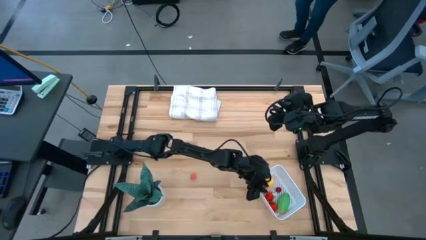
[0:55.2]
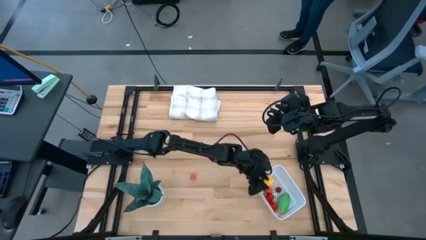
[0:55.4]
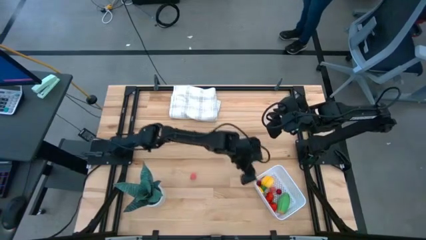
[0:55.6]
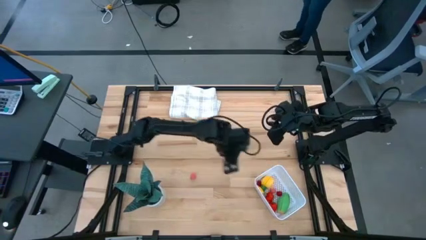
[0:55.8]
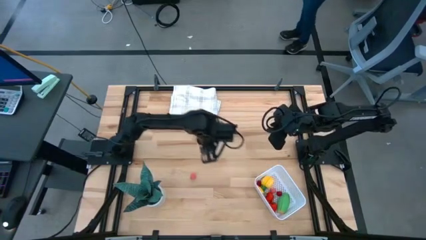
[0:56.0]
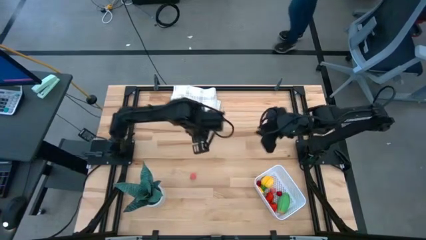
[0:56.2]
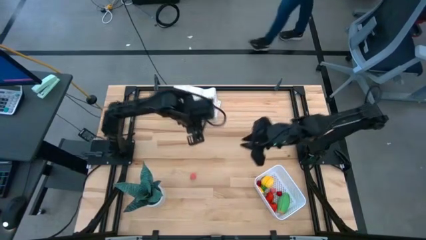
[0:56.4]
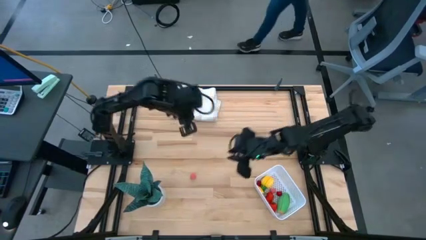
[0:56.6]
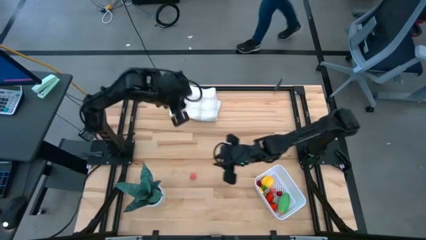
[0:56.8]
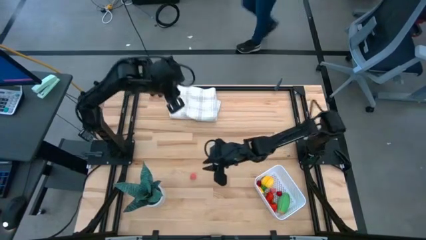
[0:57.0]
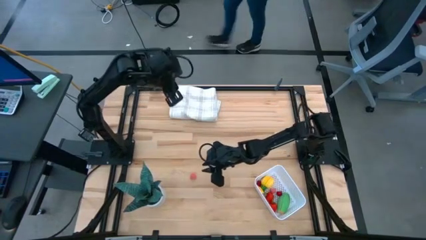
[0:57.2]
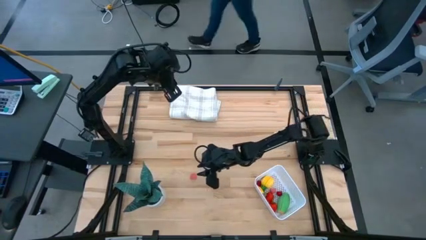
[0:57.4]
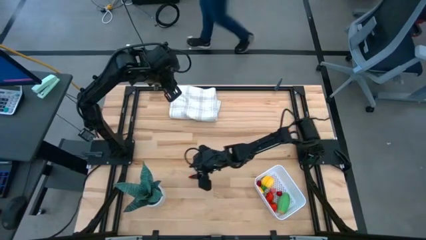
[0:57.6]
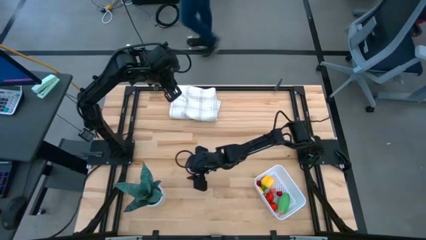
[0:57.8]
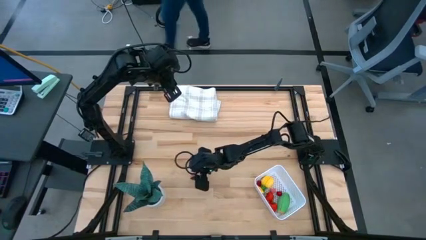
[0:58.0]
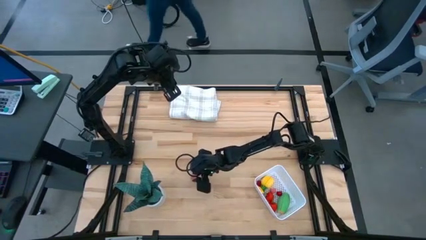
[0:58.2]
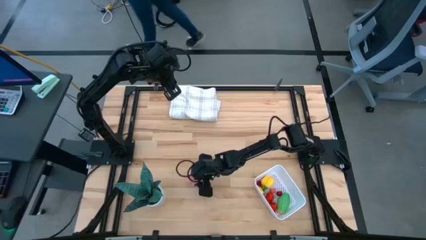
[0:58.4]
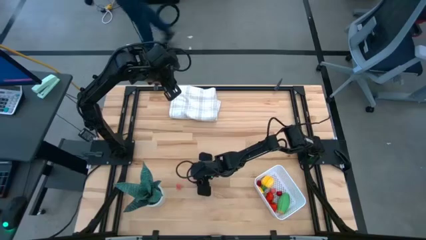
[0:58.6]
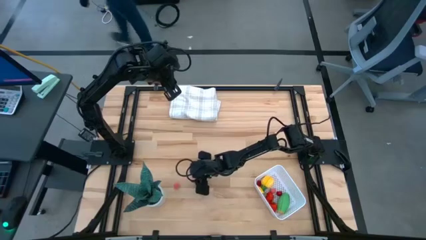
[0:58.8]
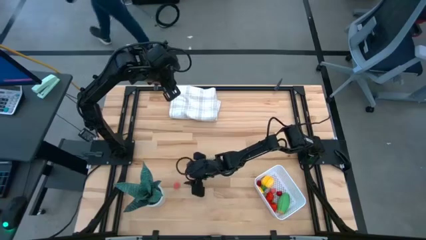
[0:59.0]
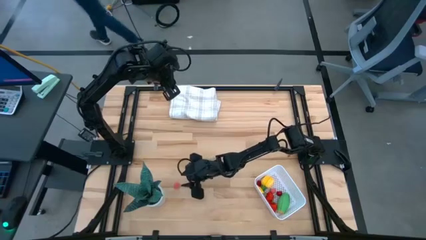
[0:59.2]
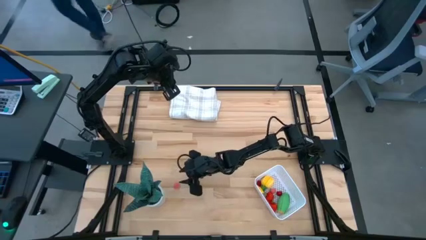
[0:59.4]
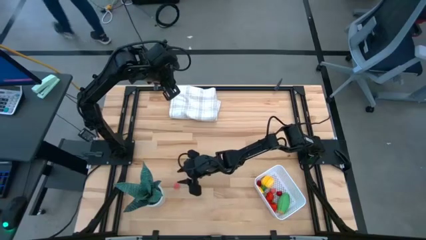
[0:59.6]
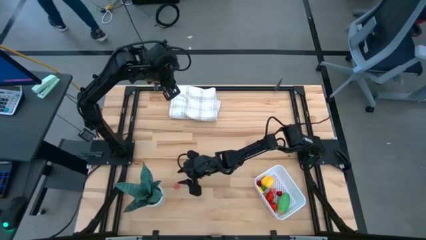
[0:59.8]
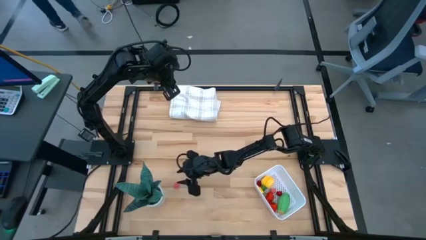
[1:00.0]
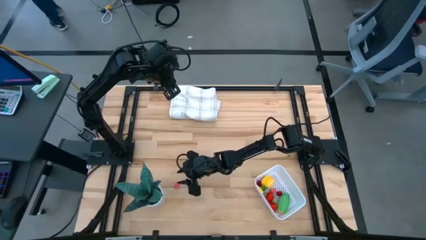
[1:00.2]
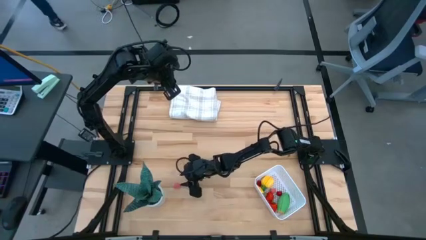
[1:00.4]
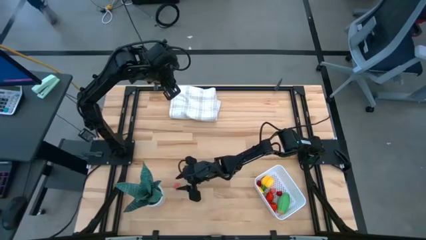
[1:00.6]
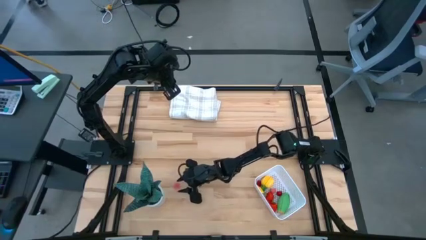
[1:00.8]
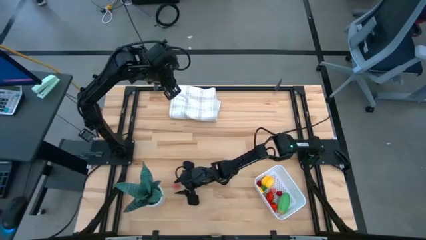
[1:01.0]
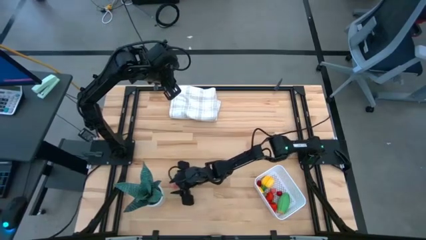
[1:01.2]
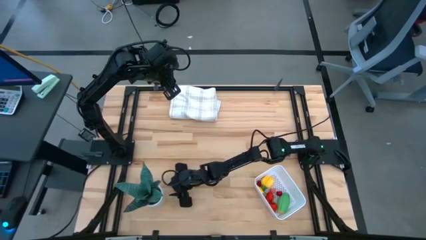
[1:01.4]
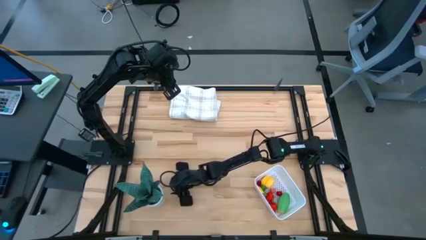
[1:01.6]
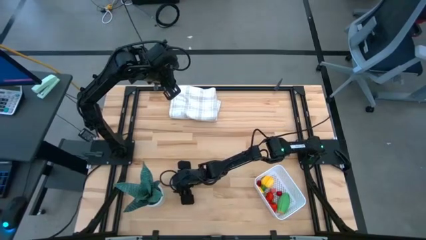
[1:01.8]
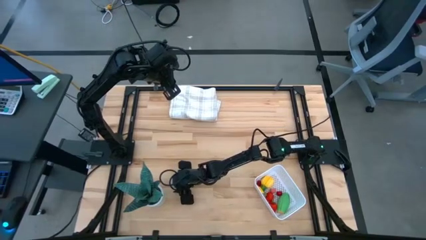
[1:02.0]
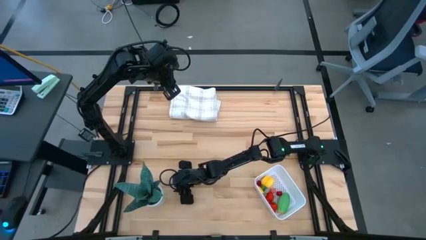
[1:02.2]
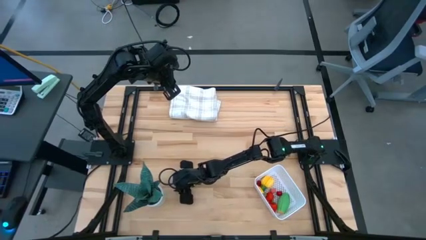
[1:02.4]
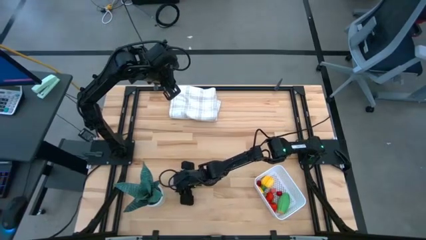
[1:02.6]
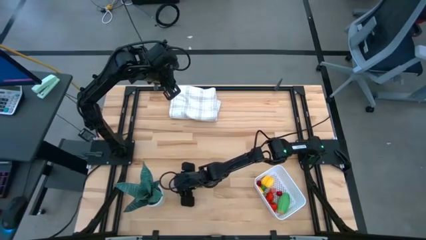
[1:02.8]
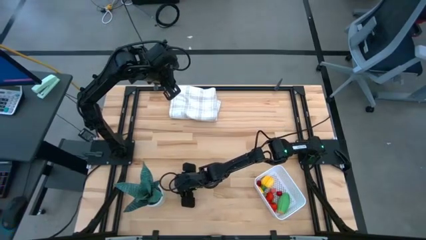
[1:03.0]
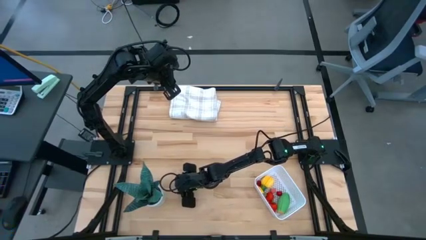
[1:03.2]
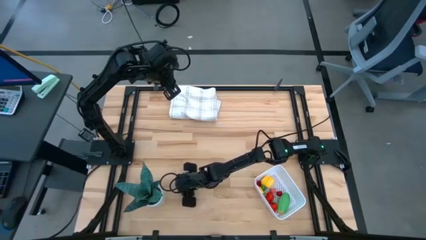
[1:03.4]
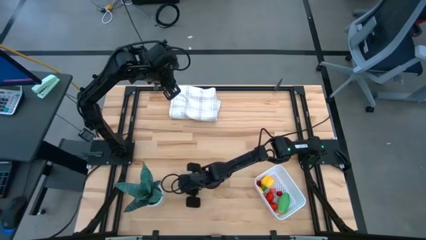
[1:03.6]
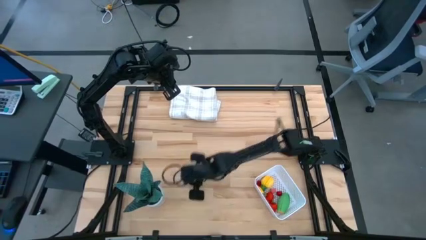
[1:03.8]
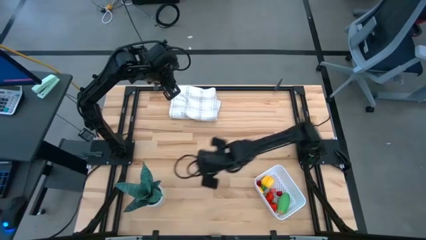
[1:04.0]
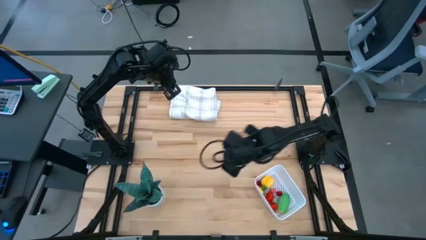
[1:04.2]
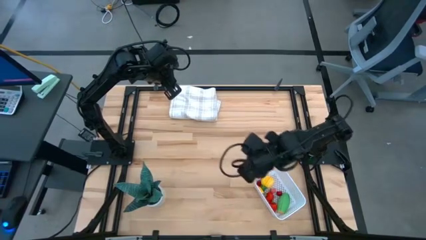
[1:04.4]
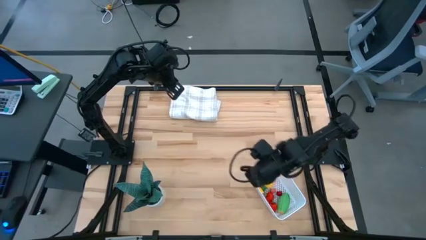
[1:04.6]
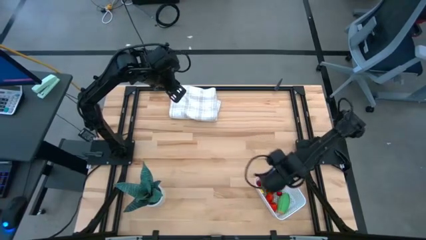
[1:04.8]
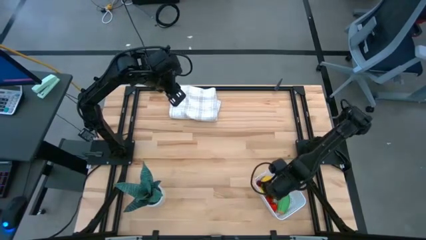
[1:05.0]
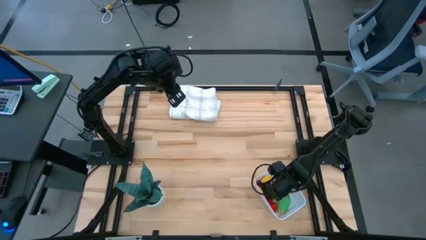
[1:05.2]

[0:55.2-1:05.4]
Task: Pick and placing Produce into tupperware
Put the peach into the white bin

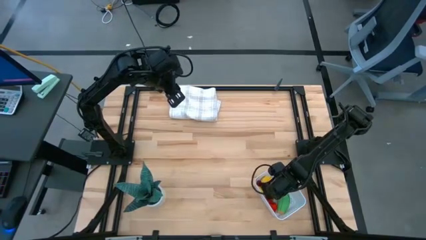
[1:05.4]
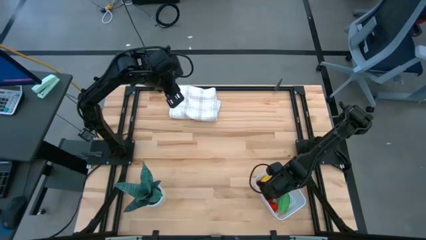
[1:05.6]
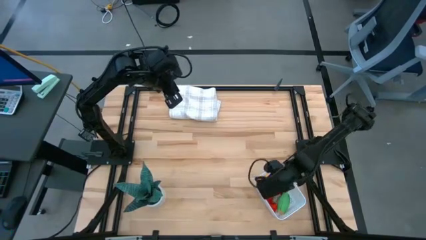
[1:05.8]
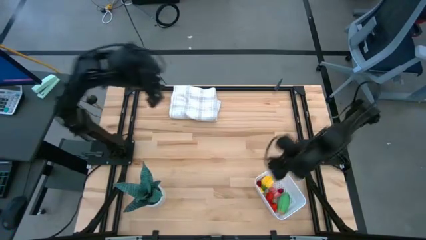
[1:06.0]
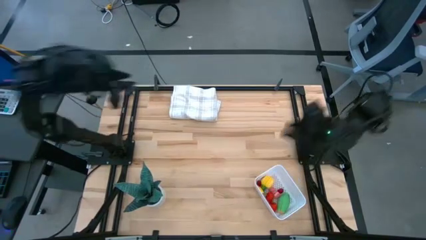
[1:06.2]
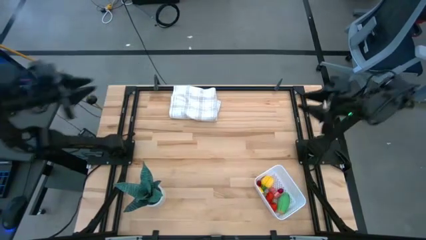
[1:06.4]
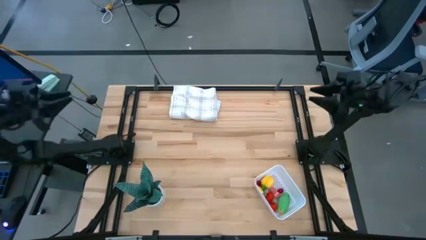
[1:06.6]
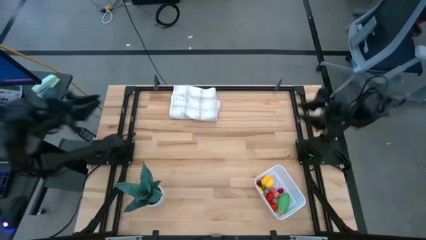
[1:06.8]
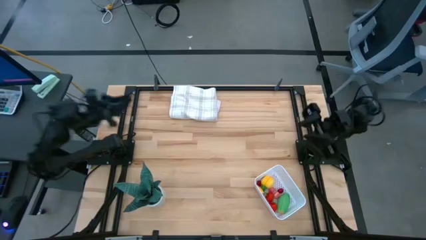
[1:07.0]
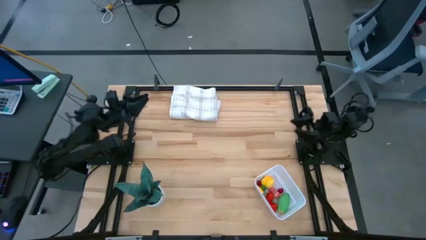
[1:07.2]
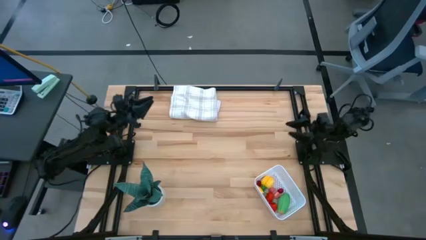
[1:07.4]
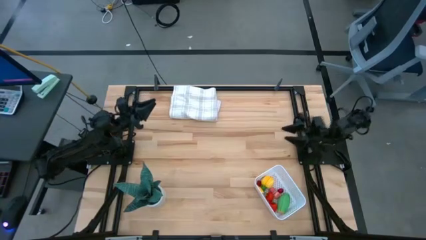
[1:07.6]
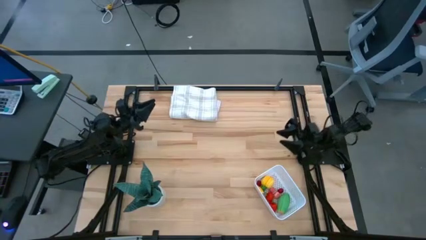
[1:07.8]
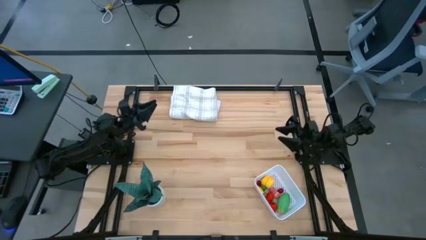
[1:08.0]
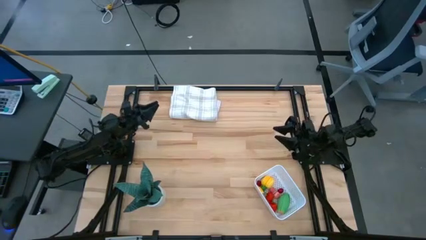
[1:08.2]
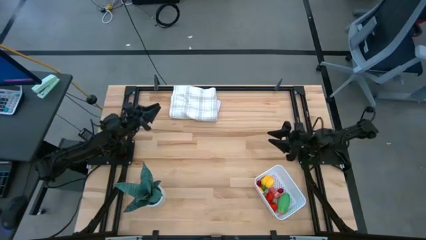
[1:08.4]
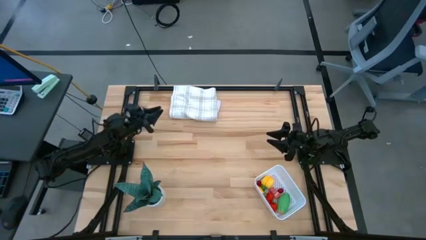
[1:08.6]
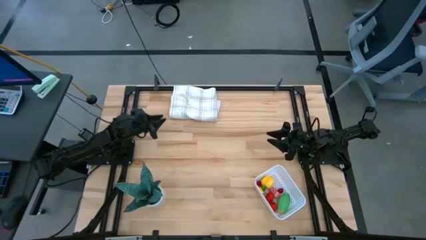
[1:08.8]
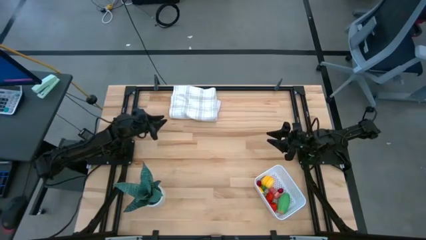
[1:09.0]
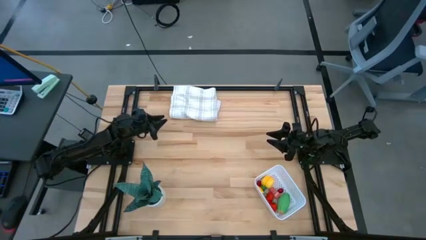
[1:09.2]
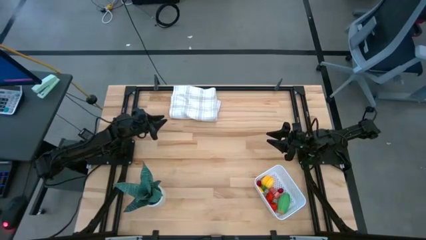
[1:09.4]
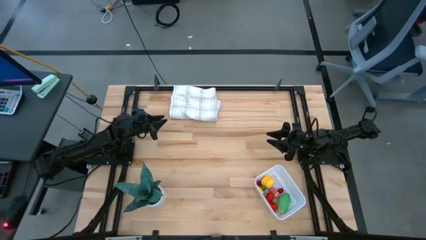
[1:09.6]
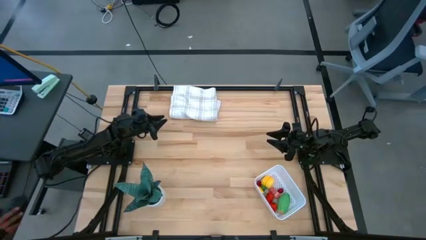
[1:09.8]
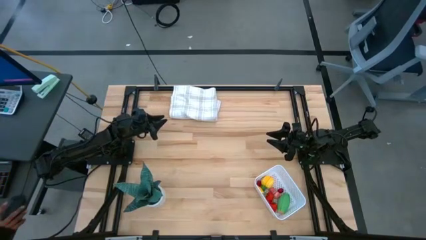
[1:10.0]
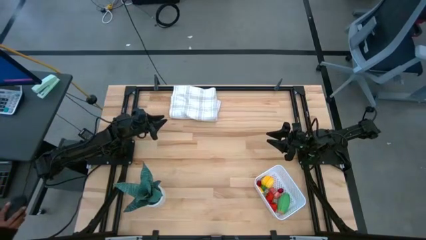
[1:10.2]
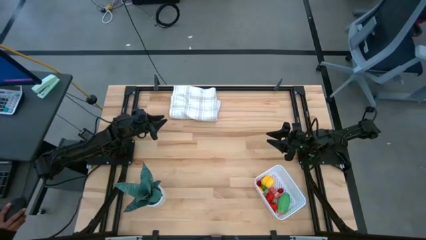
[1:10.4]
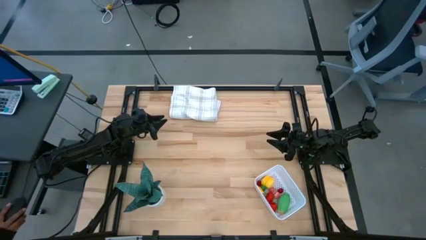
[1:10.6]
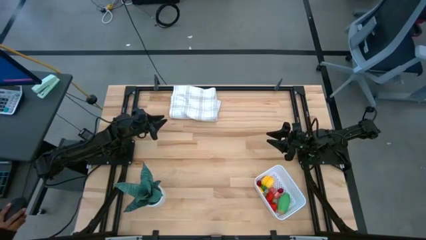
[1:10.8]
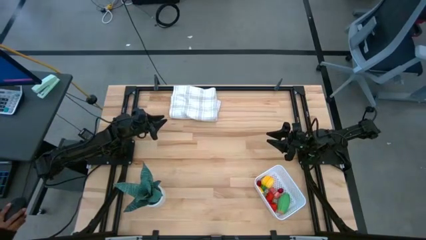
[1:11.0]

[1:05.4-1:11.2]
Return to Home Position
